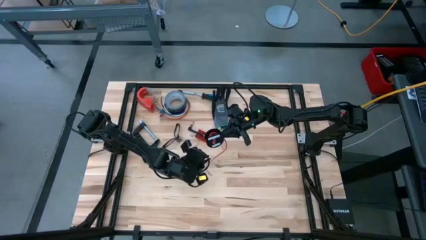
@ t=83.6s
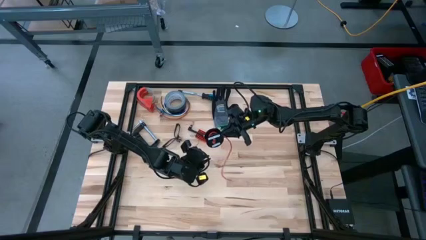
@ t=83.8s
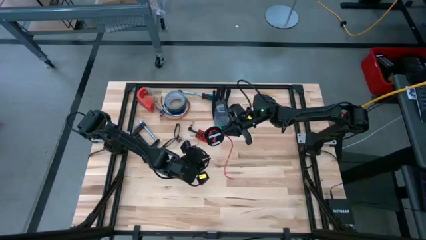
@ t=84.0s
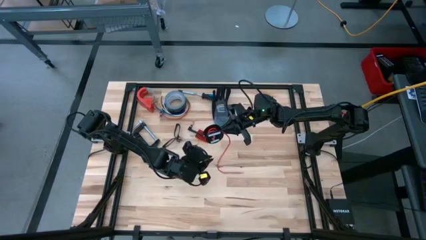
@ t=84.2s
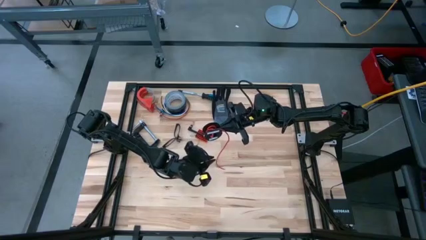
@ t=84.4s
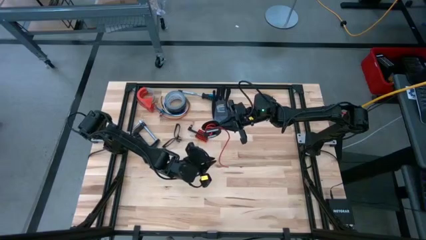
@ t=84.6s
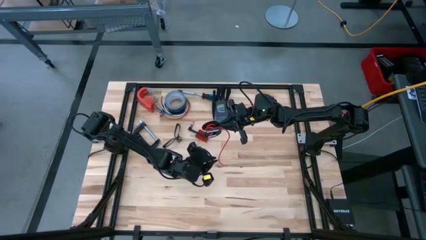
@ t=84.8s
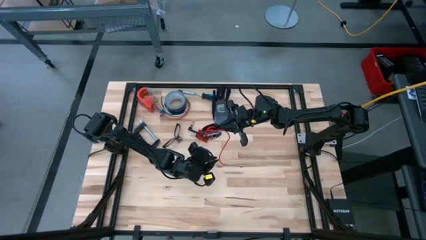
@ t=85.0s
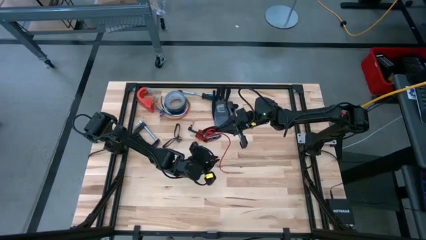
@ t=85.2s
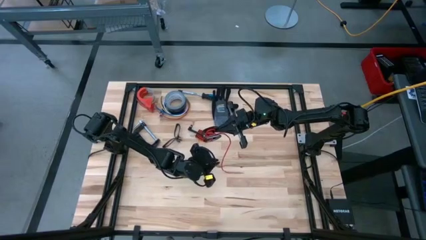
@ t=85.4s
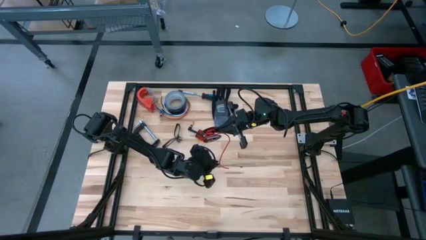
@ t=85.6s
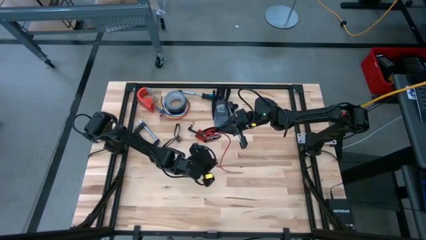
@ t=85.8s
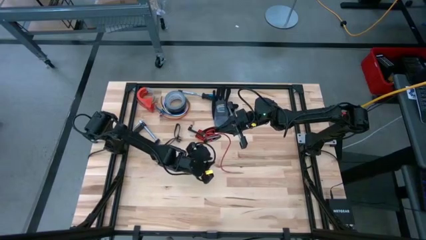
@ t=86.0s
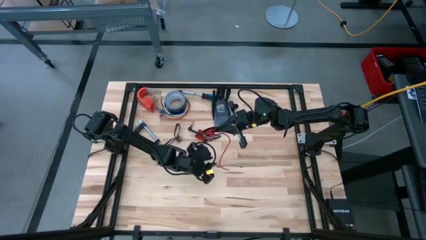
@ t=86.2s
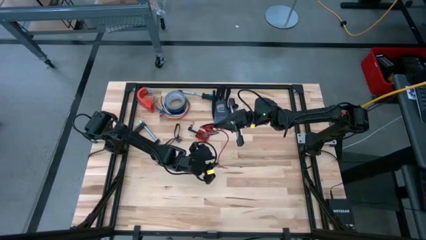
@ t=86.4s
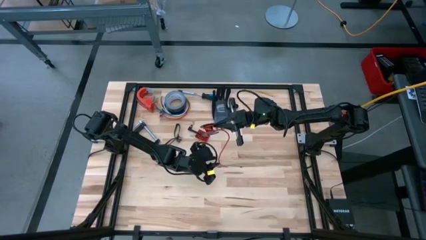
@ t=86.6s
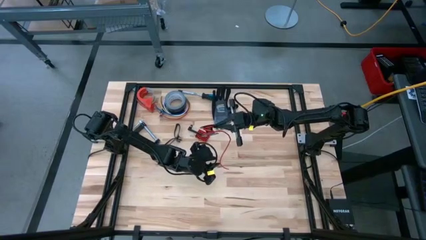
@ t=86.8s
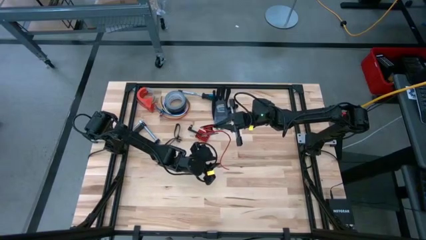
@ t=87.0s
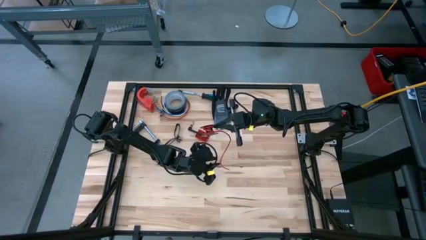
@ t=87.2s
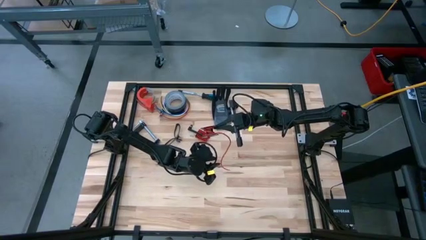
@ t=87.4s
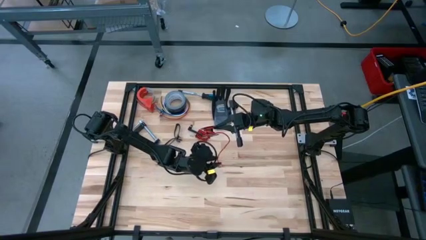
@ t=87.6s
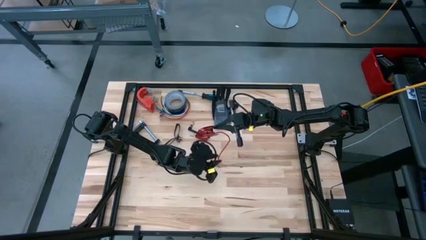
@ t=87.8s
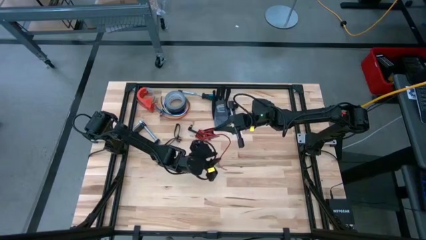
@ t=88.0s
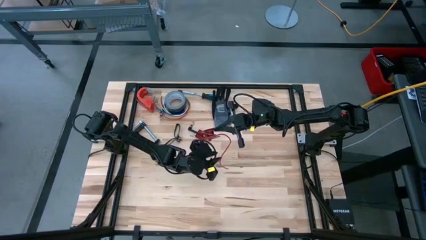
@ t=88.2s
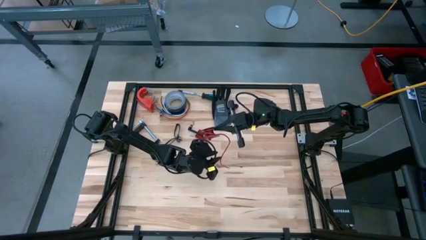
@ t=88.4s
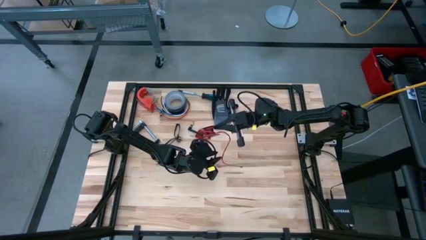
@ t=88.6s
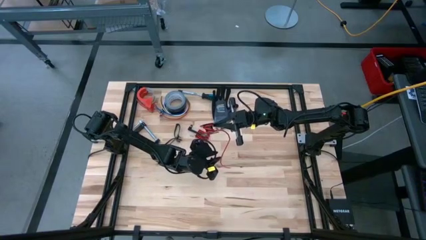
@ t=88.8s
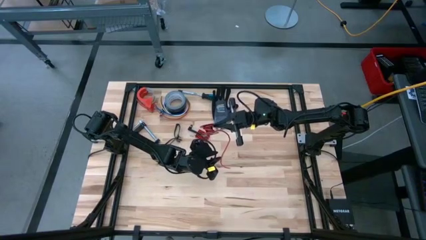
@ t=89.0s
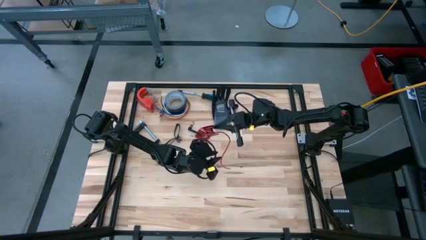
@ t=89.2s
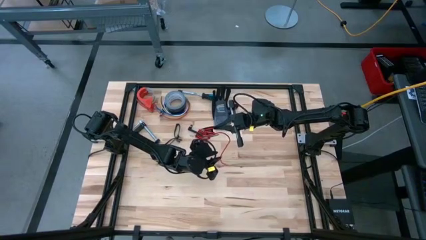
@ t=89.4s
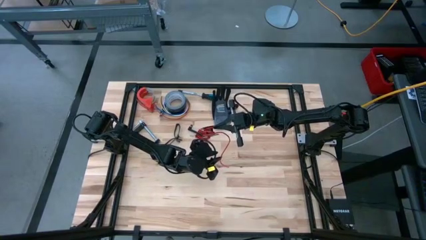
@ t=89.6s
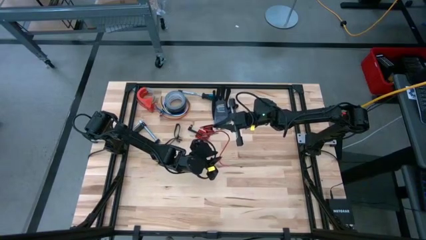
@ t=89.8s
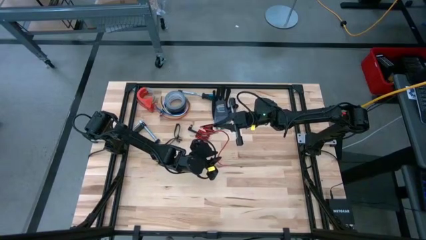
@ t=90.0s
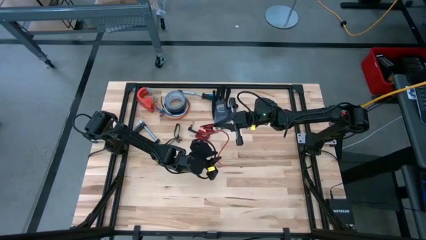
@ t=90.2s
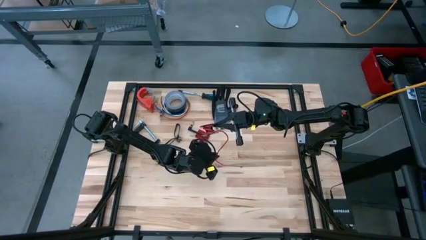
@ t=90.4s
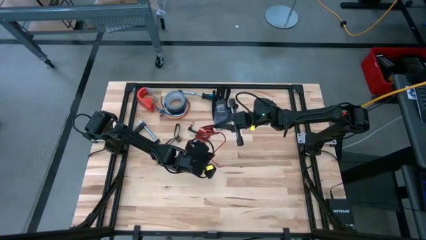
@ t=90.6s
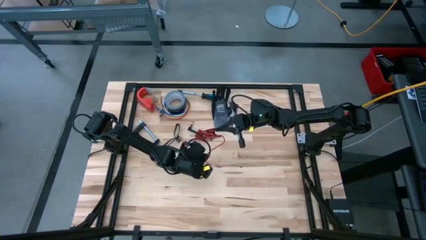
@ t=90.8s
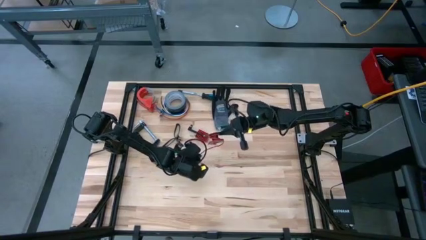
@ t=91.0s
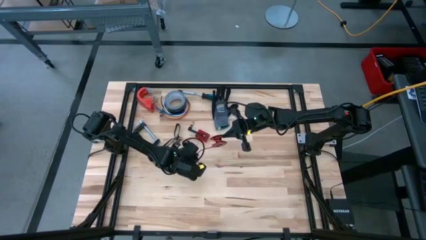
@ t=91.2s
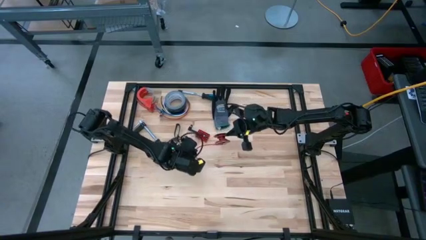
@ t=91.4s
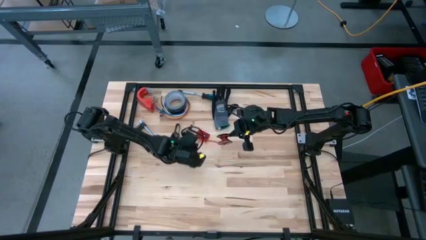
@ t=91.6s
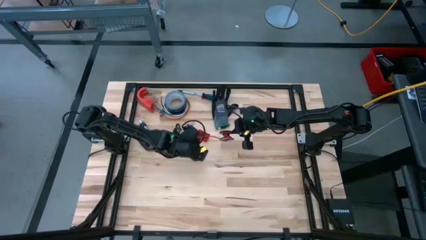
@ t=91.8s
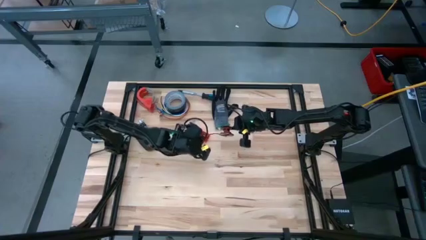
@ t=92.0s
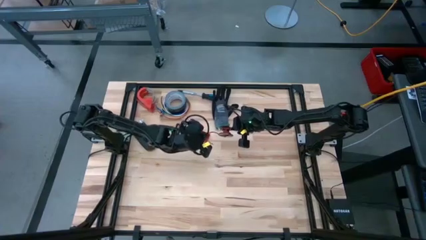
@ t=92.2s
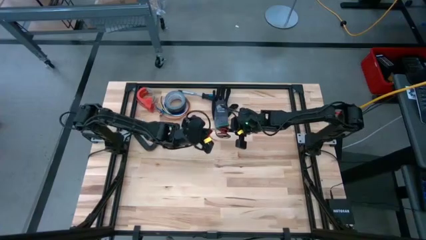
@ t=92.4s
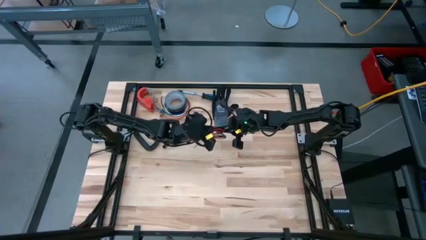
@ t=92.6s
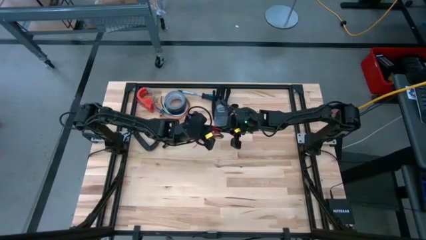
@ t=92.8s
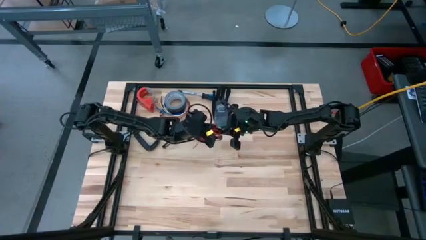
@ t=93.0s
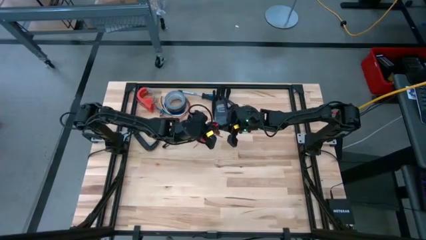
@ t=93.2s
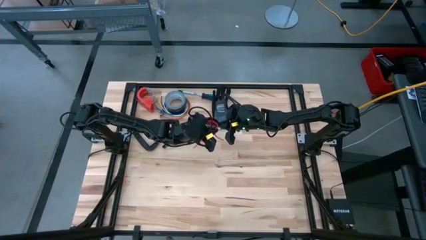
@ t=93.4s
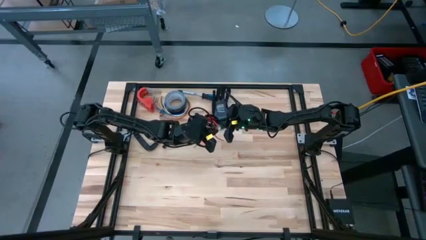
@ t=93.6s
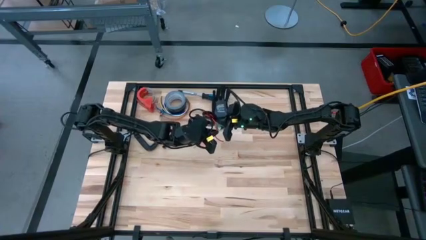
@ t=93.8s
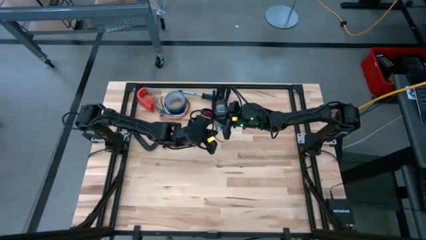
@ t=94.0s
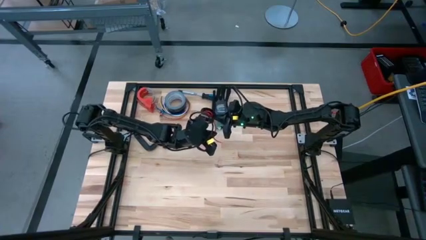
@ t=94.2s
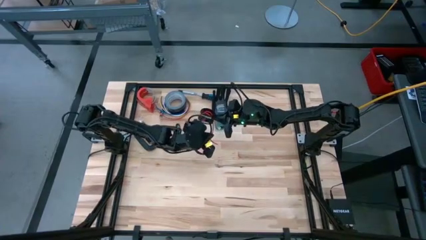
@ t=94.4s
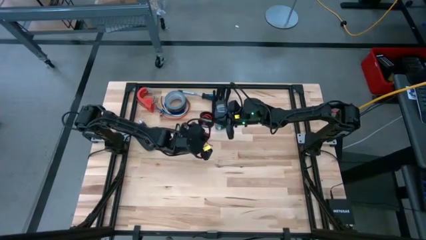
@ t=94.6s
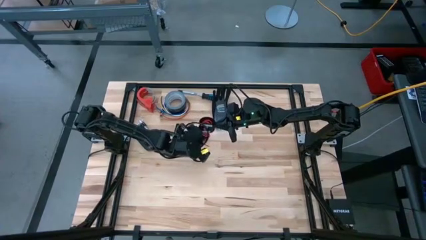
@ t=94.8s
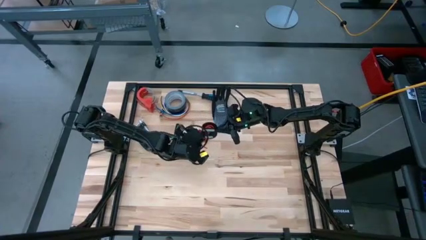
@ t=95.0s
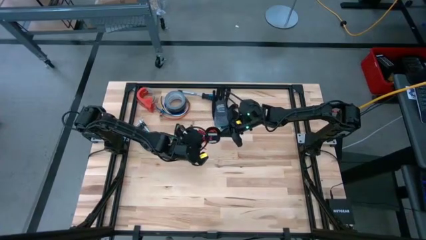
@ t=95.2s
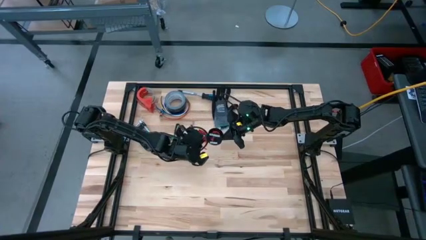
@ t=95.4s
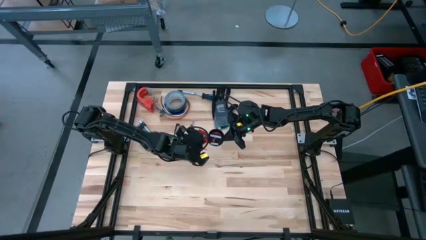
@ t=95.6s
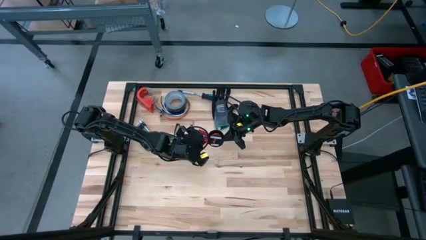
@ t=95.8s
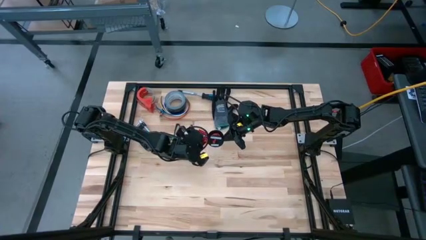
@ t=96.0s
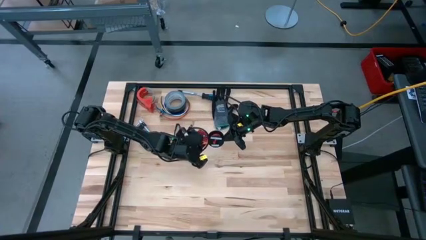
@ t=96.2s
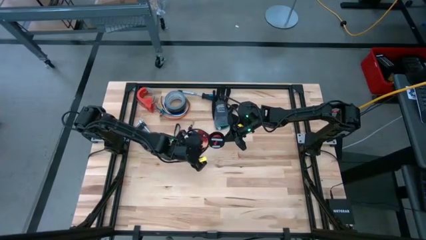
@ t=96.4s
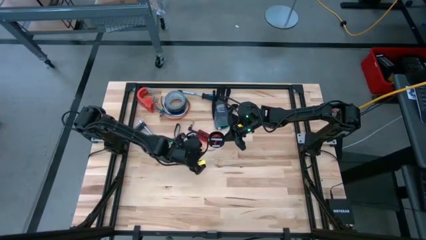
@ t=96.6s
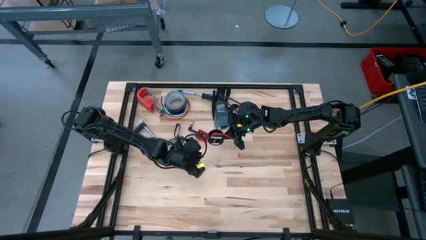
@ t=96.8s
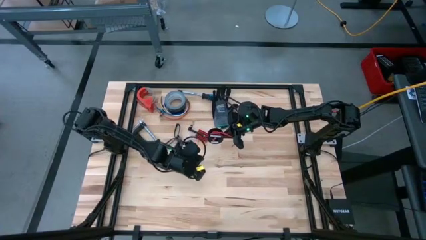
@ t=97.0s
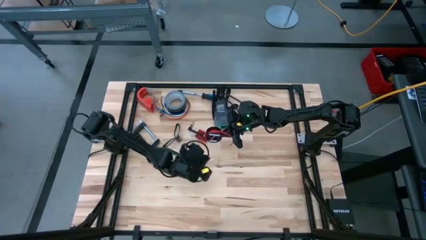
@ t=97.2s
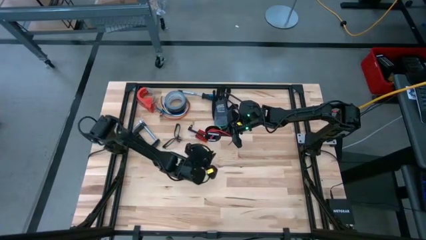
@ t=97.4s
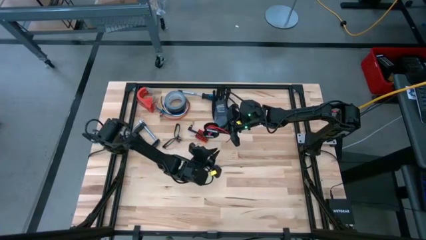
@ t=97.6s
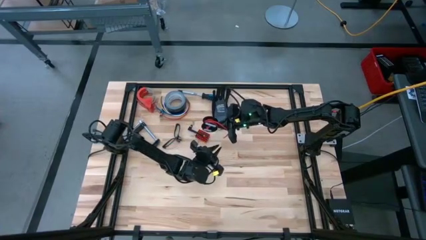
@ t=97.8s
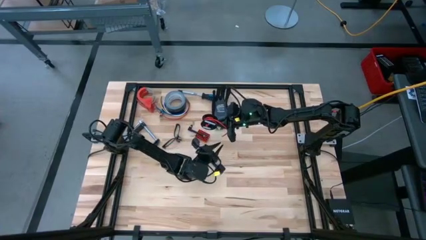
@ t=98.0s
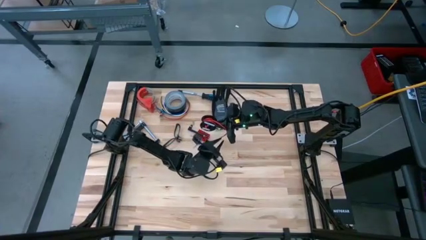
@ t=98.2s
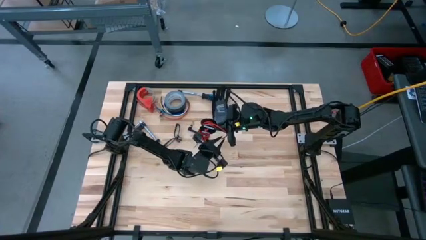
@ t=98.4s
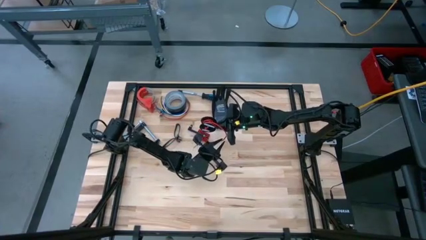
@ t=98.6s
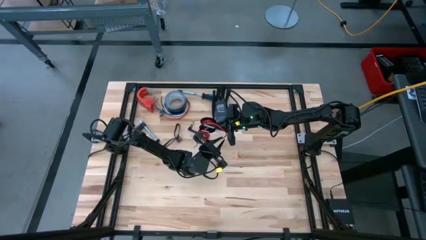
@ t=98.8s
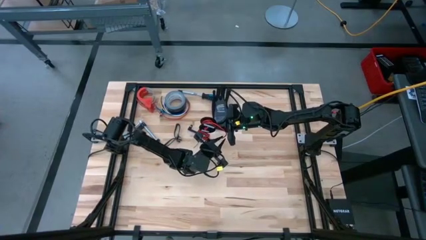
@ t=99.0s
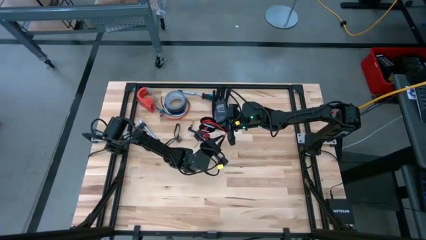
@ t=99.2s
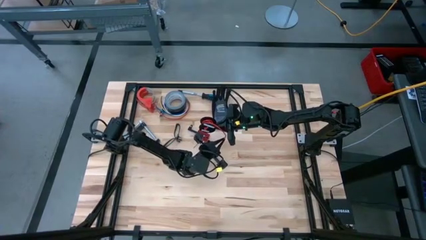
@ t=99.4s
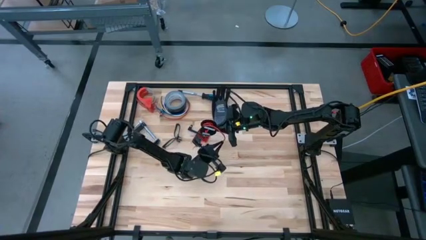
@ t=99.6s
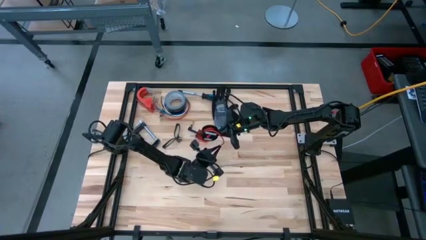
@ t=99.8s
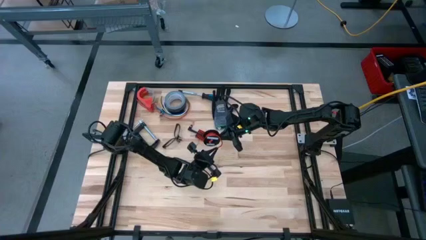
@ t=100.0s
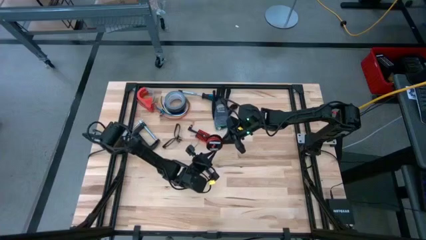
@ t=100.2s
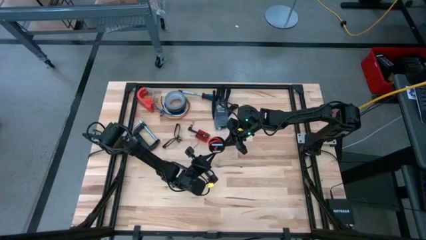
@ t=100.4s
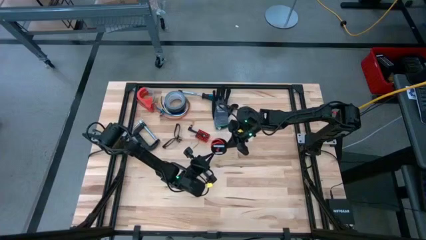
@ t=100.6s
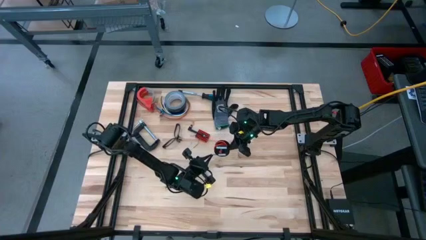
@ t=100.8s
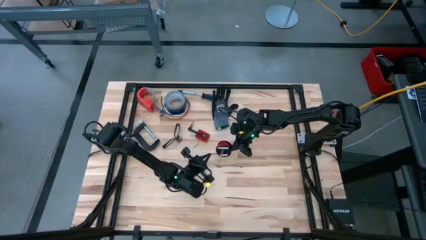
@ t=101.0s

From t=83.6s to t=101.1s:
Task: Coil cords
Coil the orange wire into the black spool
